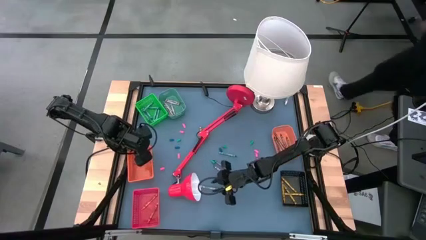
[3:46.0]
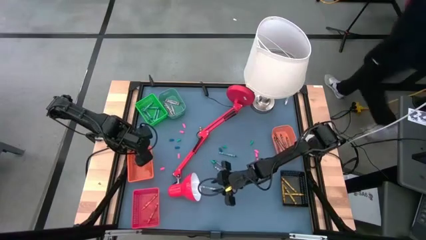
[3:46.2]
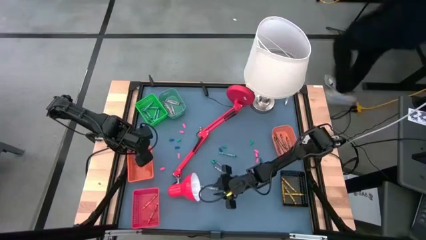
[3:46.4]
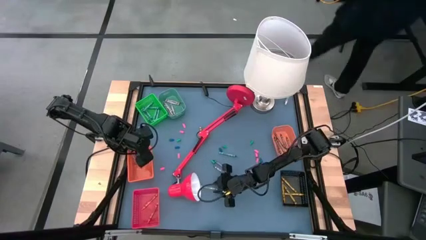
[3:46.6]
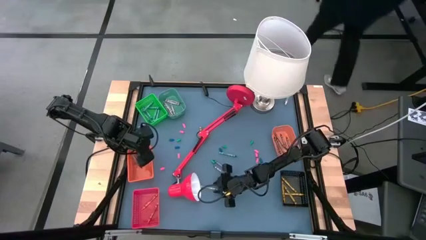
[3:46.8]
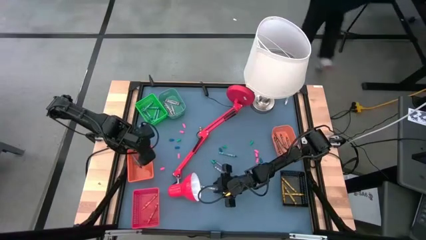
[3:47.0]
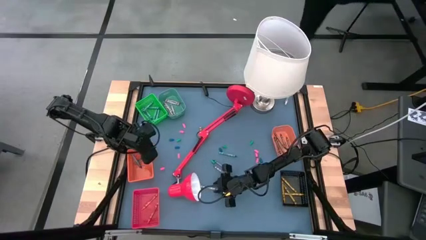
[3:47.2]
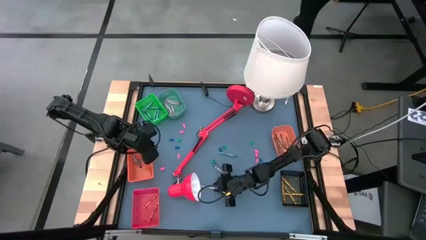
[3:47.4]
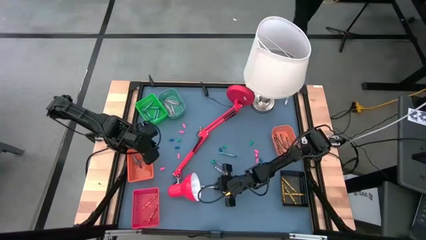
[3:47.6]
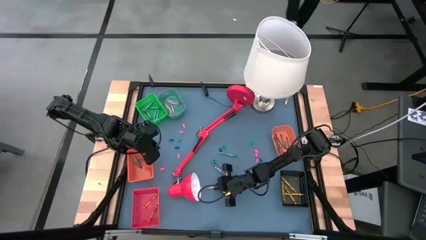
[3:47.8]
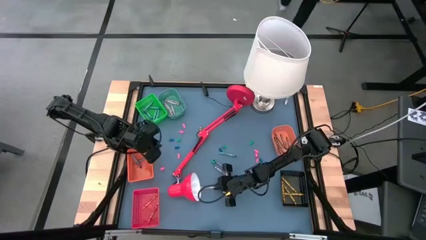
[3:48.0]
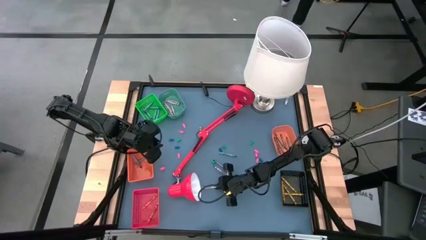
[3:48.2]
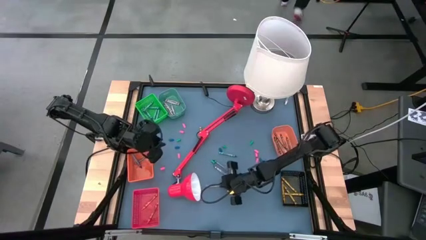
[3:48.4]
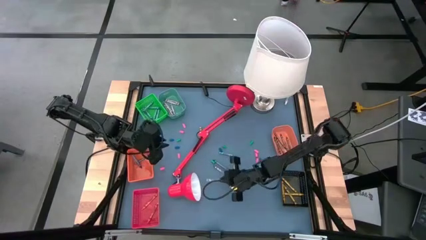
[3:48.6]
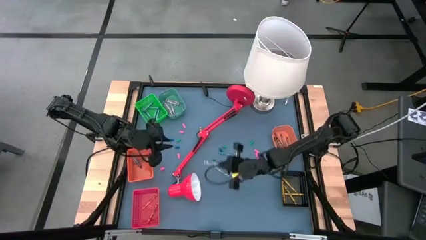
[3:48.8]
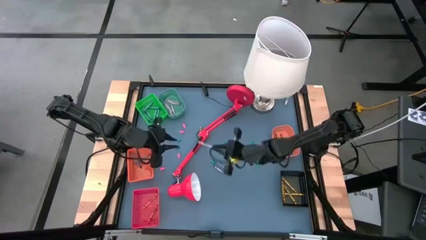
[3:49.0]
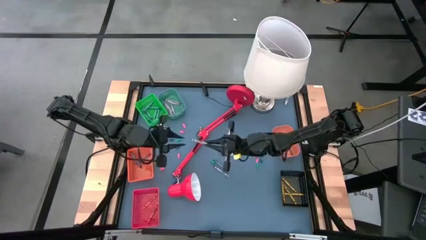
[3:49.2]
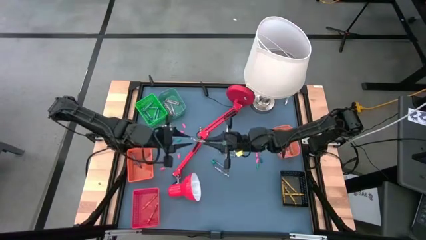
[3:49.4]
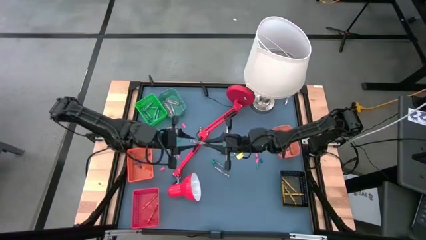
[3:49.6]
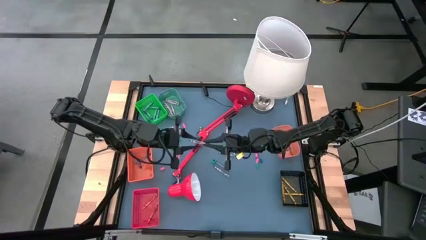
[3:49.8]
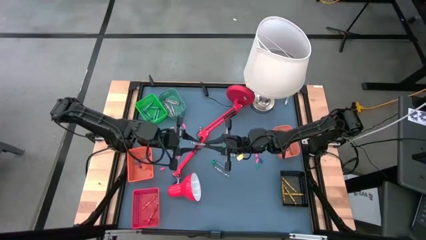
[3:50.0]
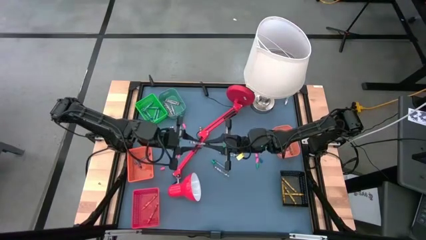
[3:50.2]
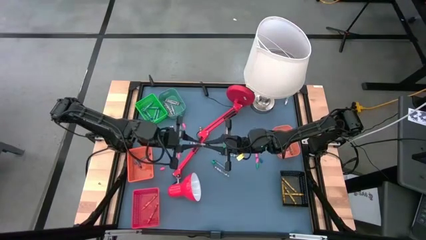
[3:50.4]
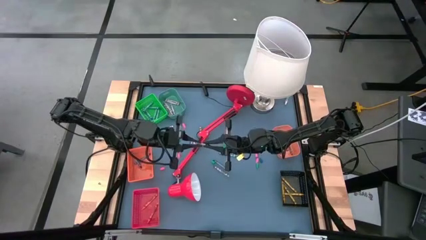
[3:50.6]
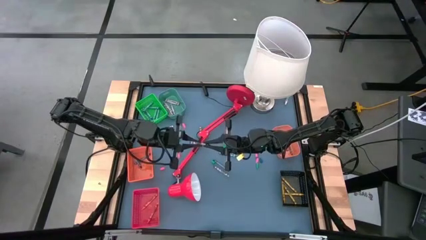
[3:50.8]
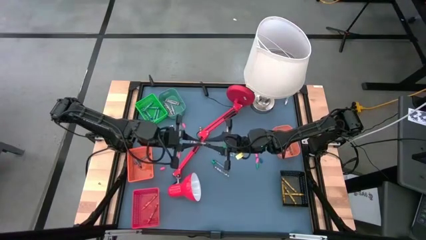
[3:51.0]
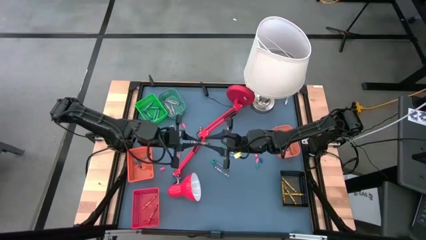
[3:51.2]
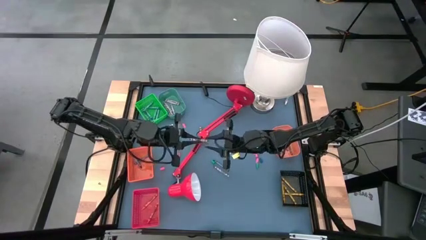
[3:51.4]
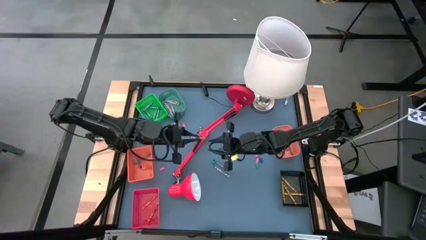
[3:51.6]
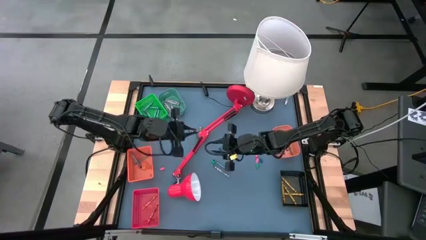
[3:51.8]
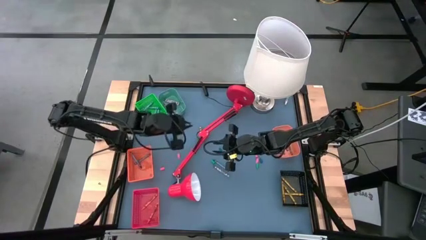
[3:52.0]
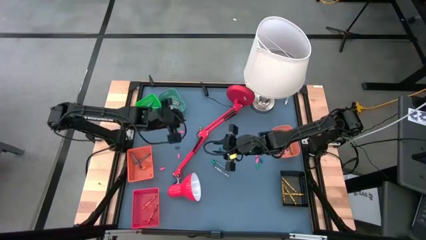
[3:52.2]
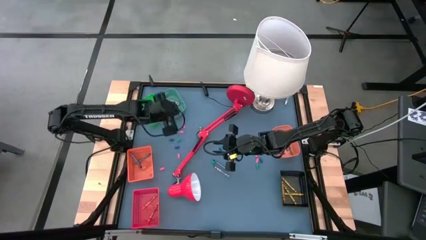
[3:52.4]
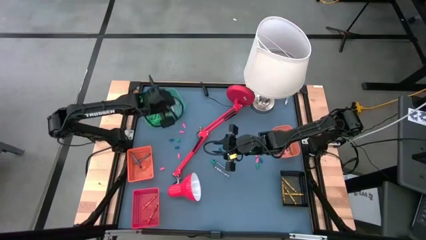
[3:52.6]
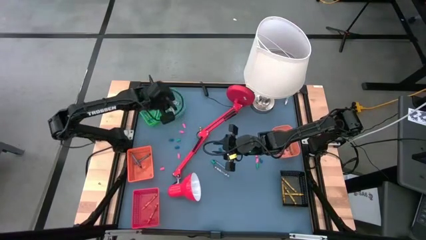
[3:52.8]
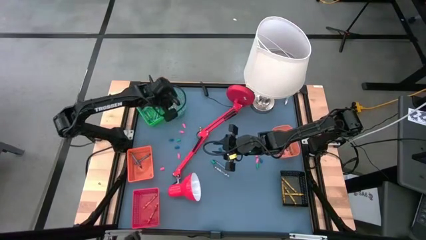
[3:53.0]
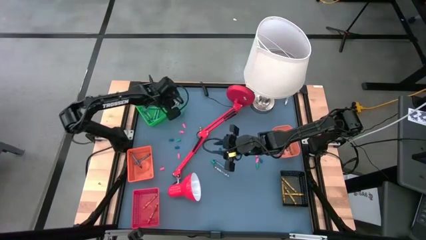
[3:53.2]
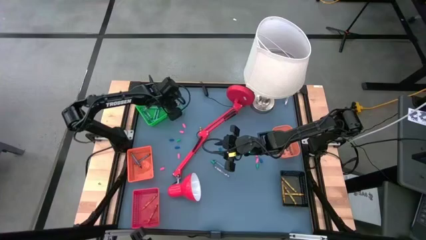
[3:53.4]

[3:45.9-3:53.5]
Task: Sort crayons
Put the bottom gray crayon into the blue bin

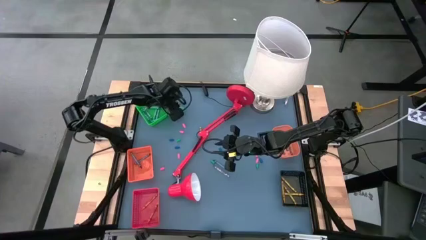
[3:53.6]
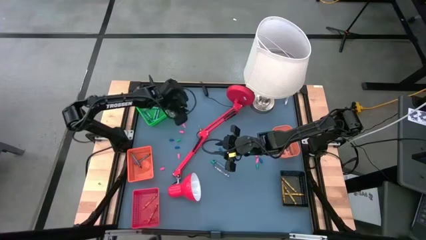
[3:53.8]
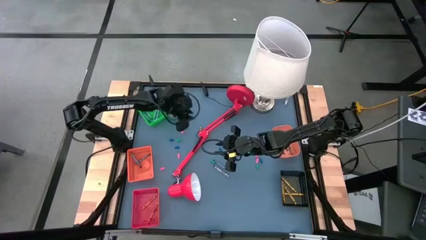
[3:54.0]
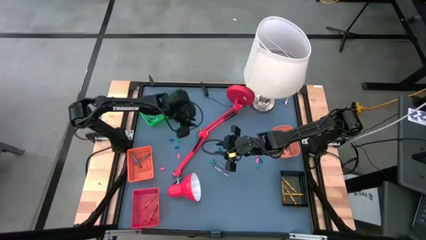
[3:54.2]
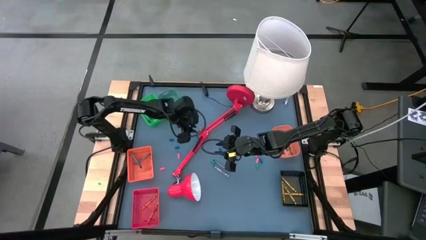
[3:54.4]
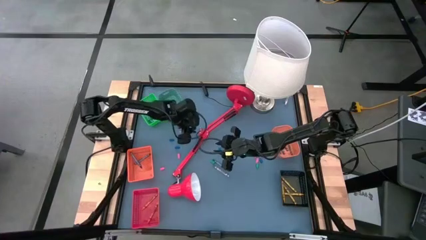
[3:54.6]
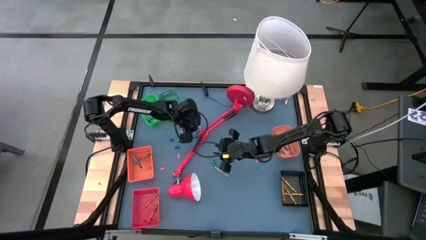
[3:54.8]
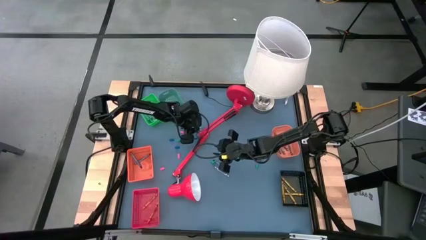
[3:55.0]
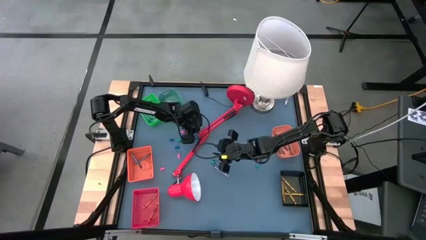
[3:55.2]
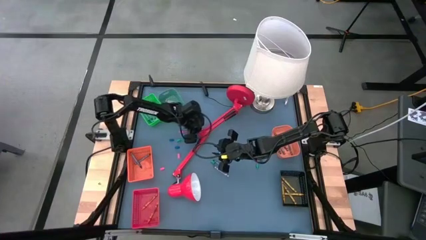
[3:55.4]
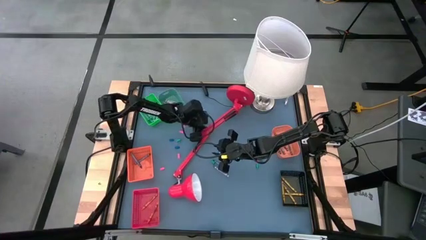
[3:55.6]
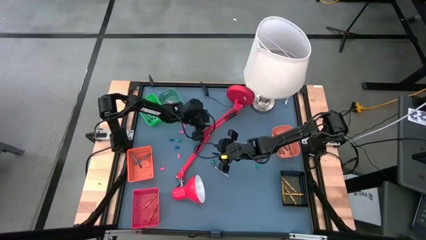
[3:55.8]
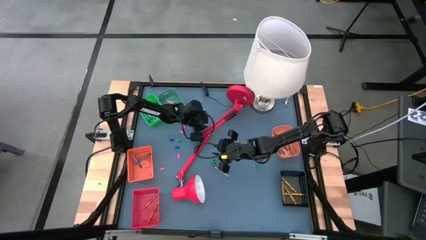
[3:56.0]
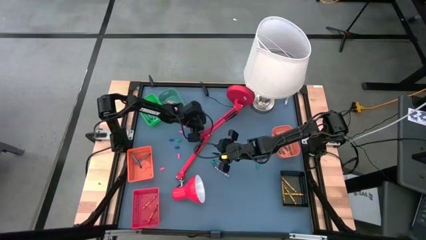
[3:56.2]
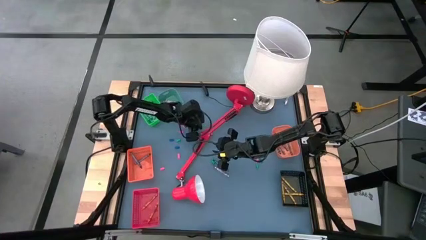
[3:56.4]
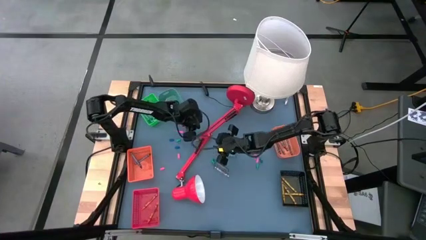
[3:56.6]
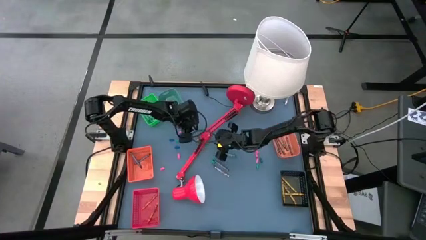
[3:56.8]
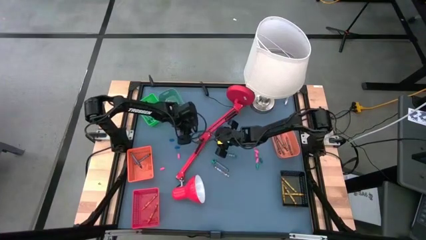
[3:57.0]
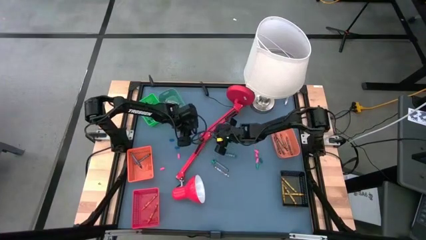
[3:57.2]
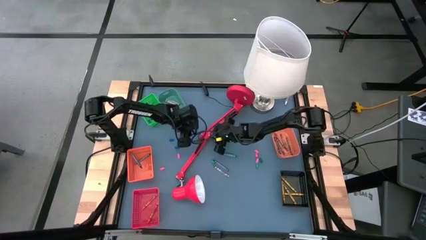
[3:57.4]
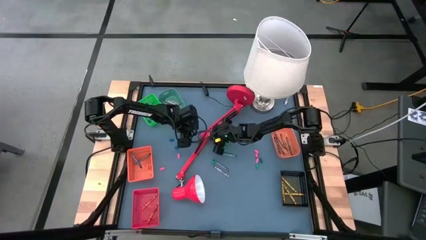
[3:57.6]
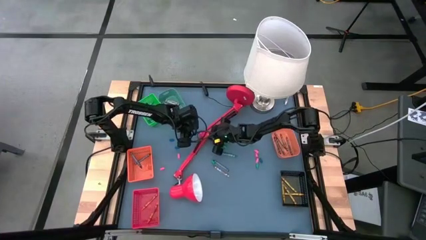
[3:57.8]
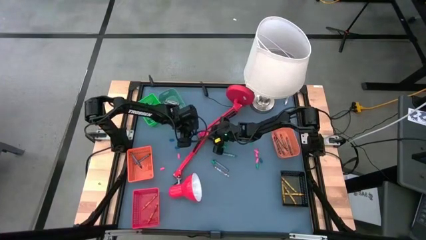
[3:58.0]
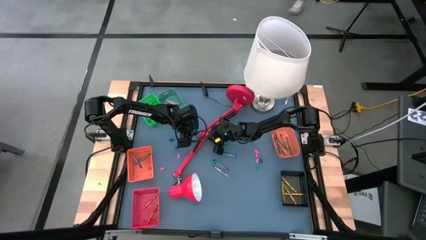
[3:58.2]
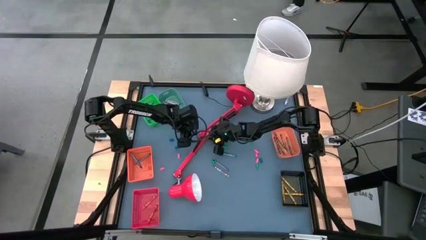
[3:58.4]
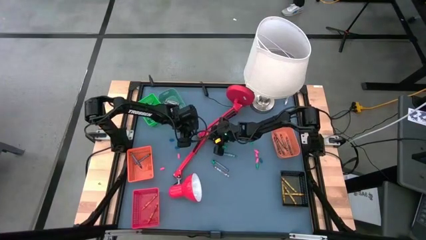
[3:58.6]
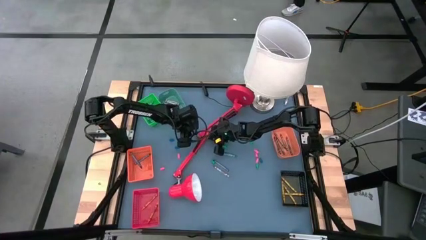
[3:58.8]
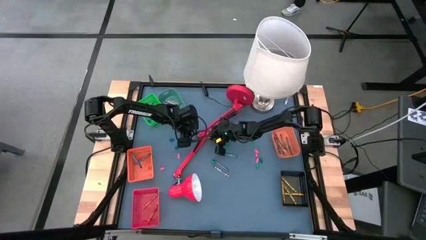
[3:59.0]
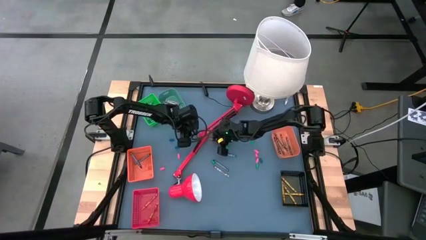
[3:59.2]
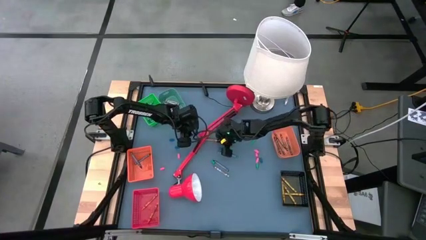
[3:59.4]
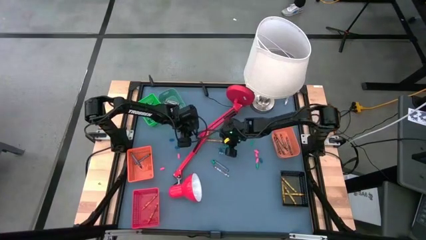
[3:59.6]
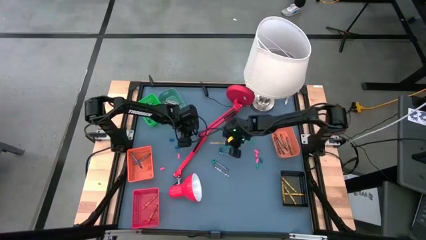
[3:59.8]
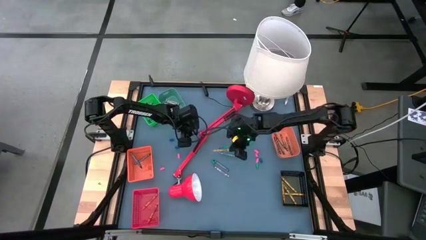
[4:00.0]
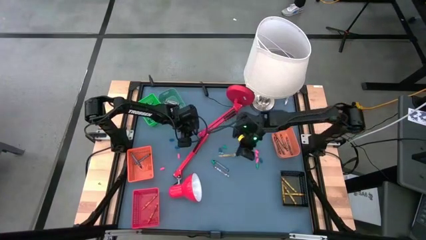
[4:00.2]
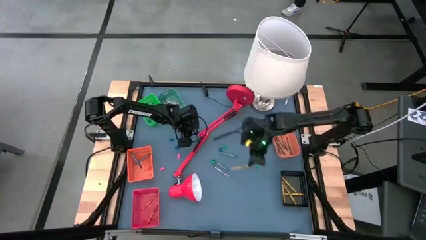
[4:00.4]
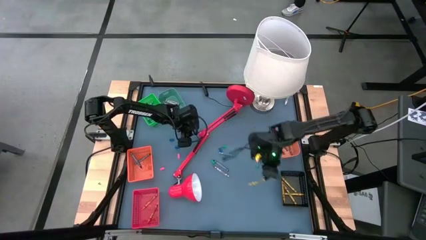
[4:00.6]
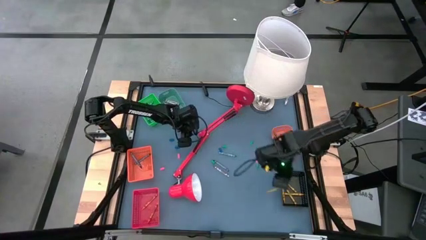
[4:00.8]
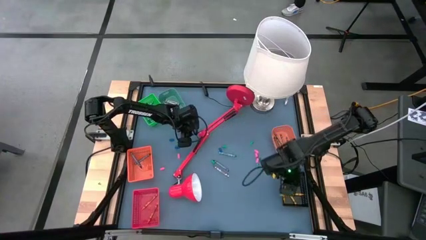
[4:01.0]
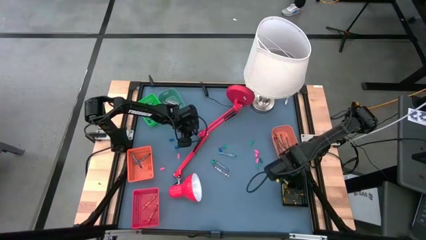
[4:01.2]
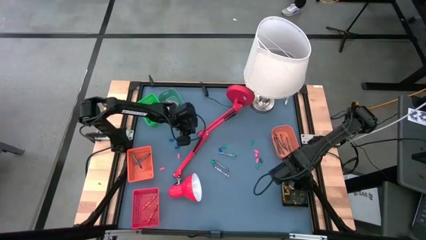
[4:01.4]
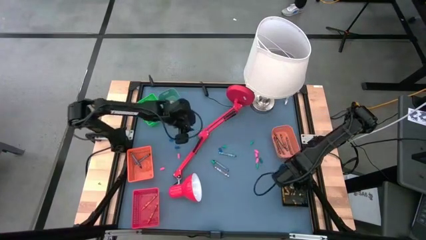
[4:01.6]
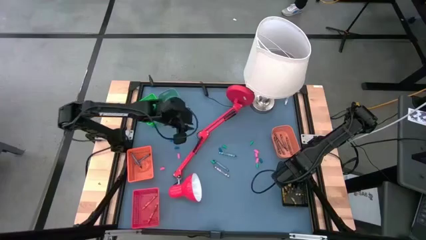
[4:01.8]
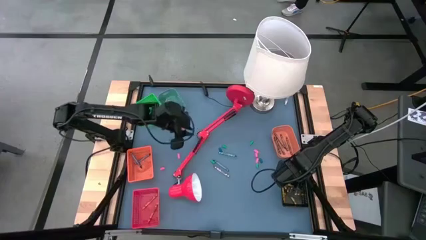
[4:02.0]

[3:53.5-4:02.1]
Put the yellow crayon into the black bin

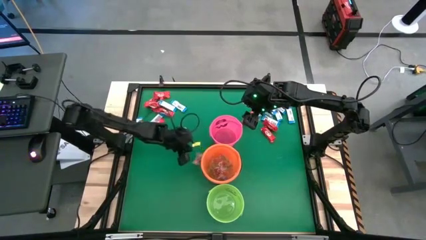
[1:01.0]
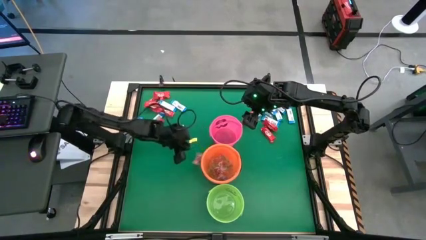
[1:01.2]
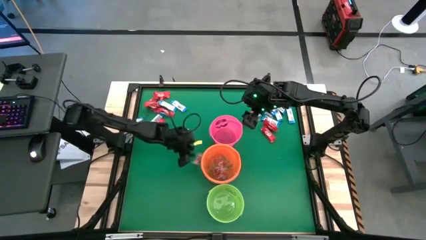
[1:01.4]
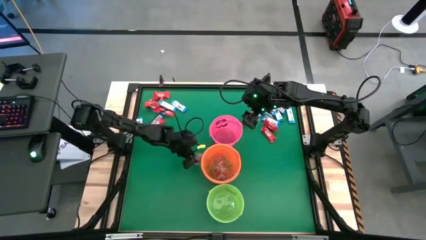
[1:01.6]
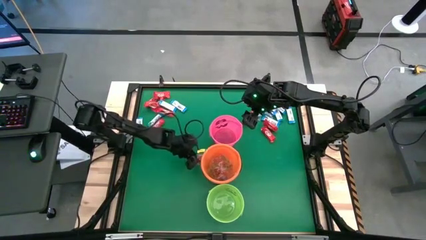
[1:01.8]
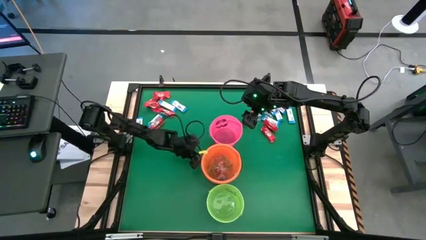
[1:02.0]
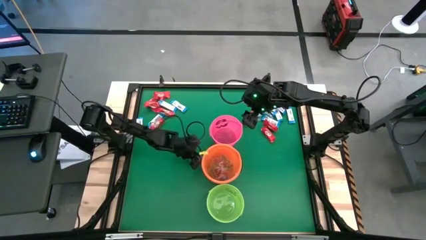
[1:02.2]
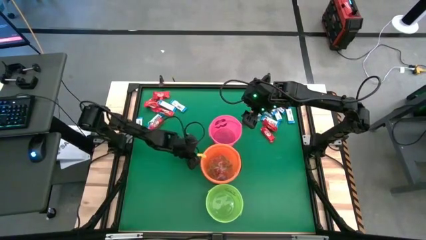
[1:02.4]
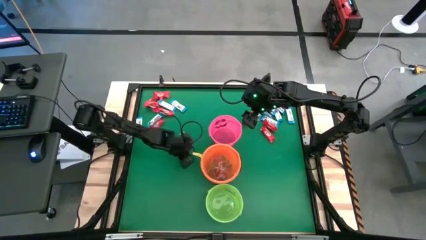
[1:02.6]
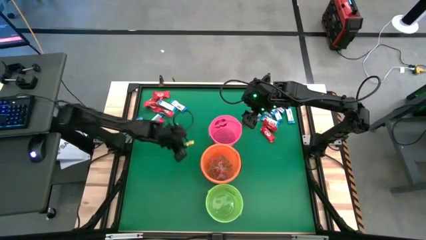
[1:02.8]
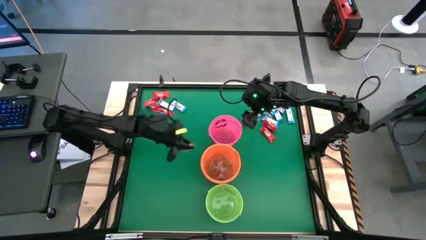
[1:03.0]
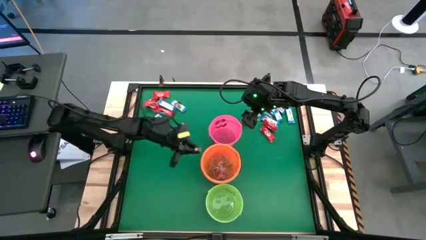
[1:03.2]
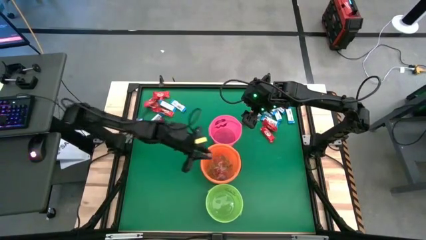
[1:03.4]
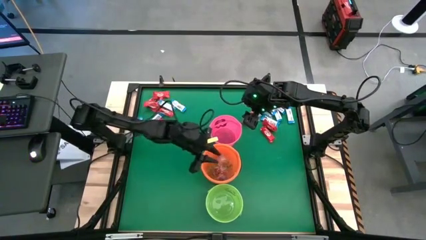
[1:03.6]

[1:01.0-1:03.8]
Task: Sort candy by brand, put in halloween buckets
Put the orange gummy into the orange bucket
